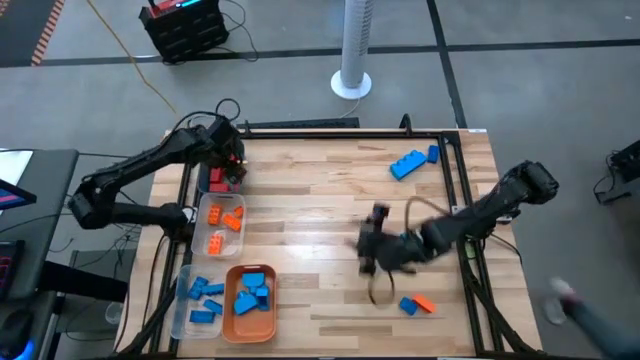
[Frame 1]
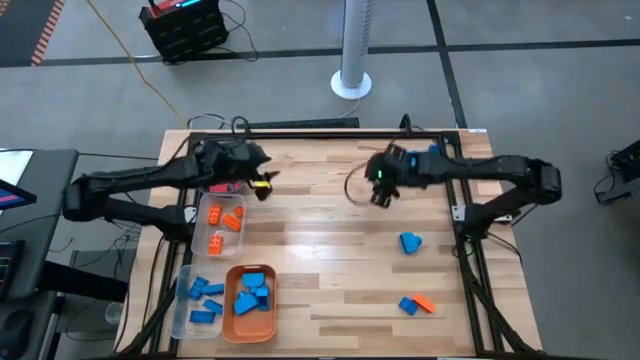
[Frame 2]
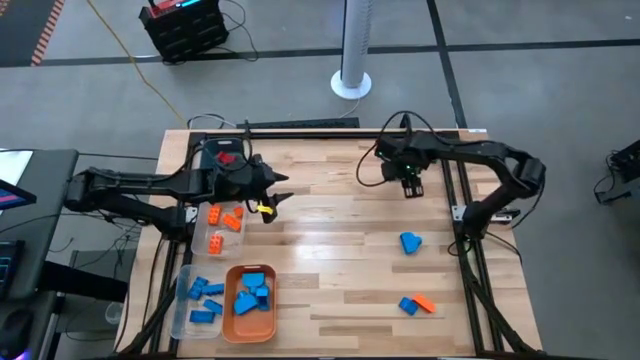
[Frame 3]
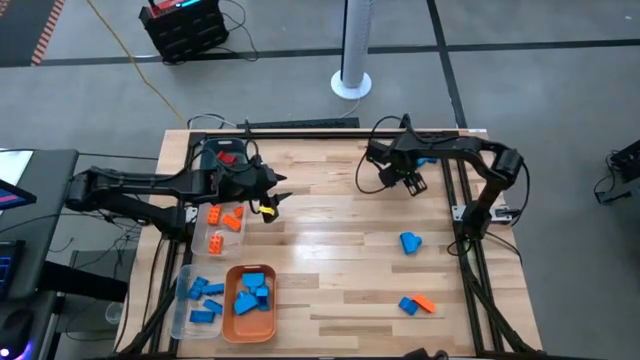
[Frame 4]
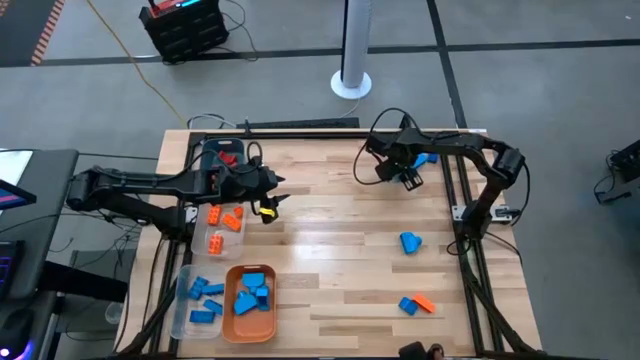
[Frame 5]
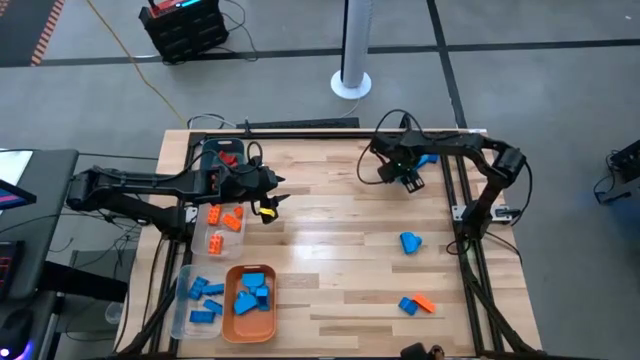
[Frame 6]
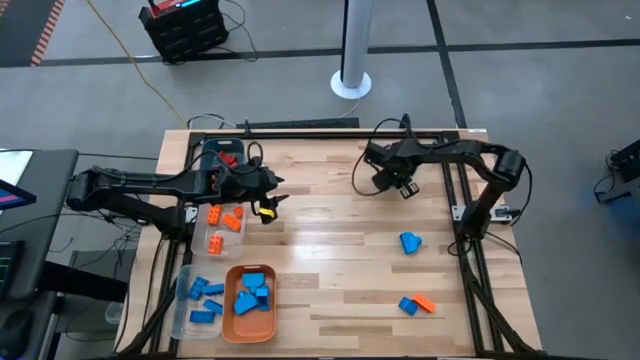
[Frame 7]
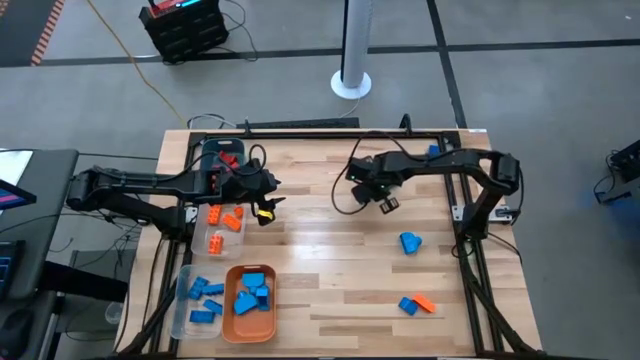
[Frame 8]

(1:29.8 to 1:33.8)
Task: Sort blocks
Put the light blue game piece into the orange bin

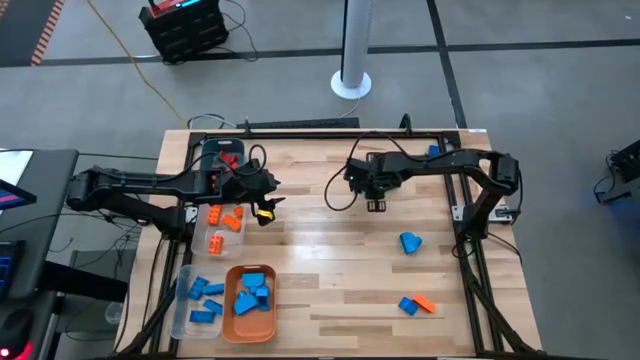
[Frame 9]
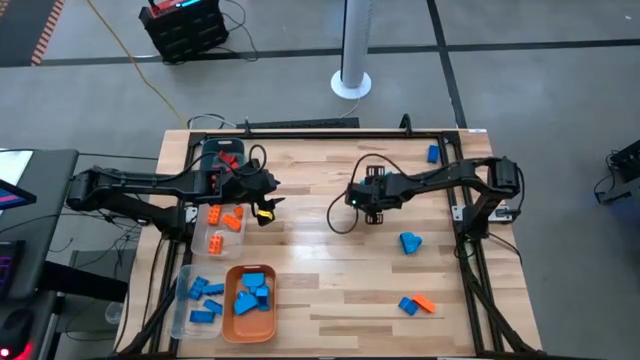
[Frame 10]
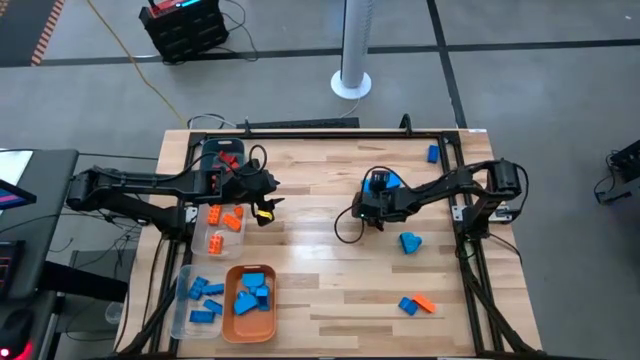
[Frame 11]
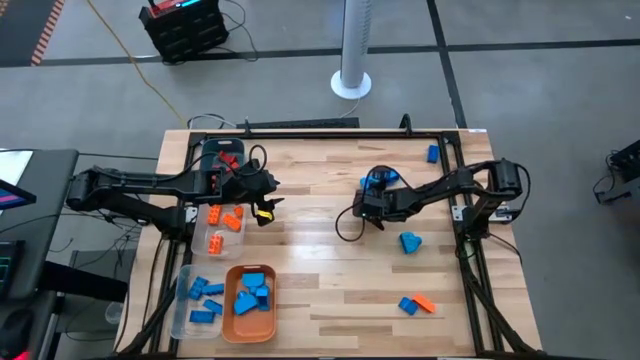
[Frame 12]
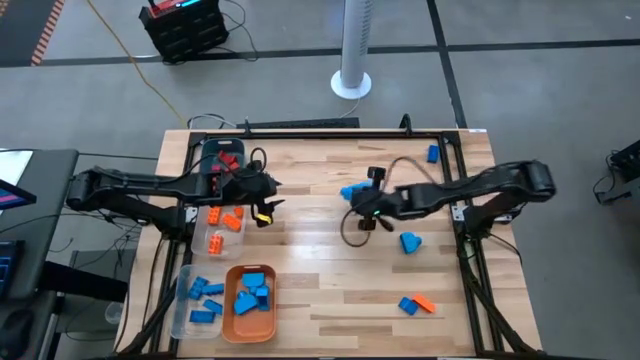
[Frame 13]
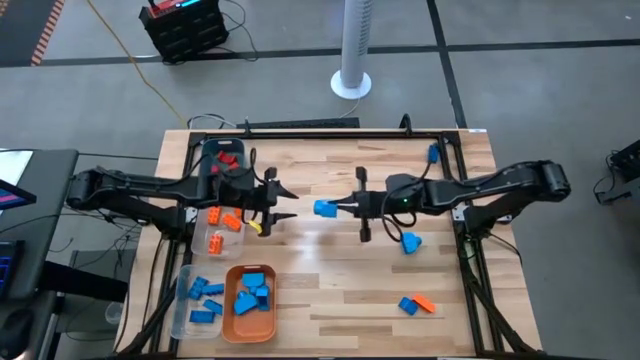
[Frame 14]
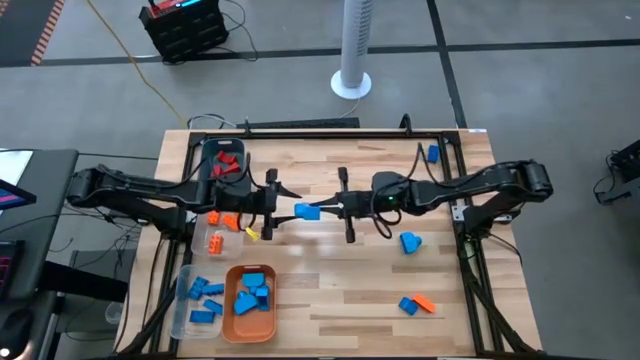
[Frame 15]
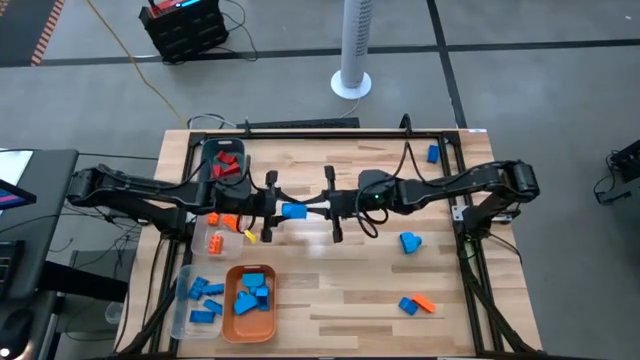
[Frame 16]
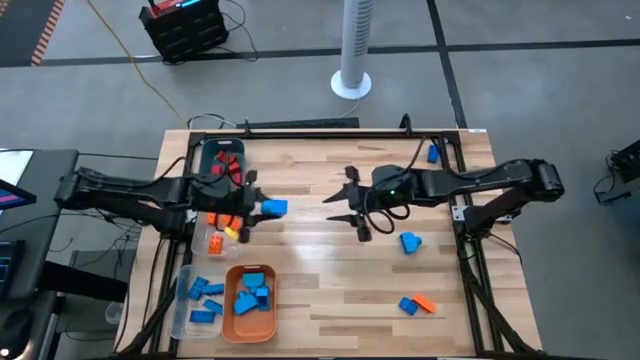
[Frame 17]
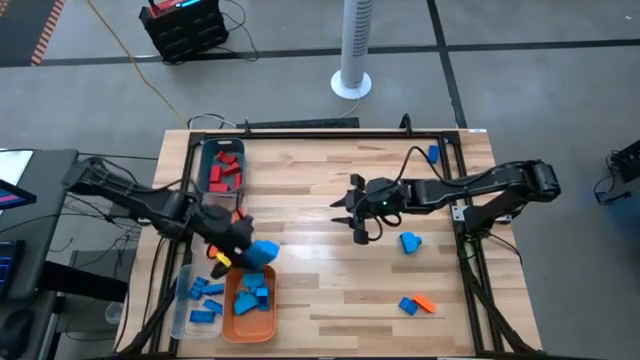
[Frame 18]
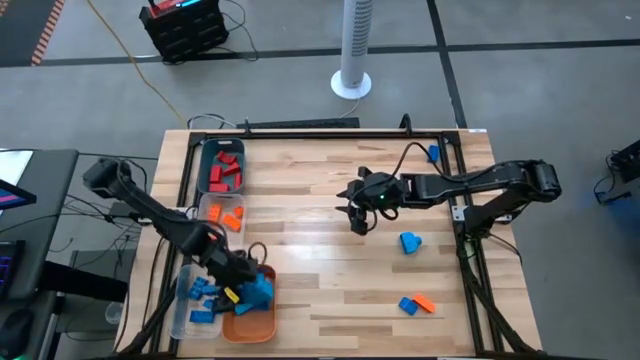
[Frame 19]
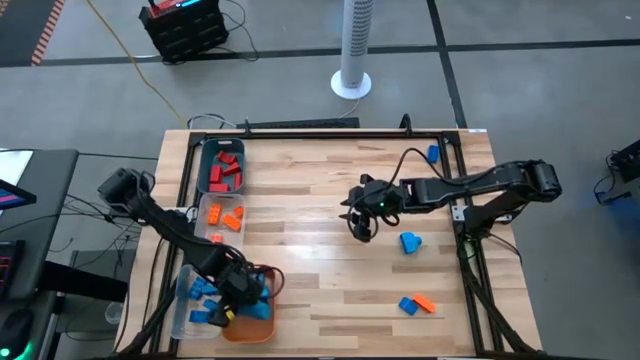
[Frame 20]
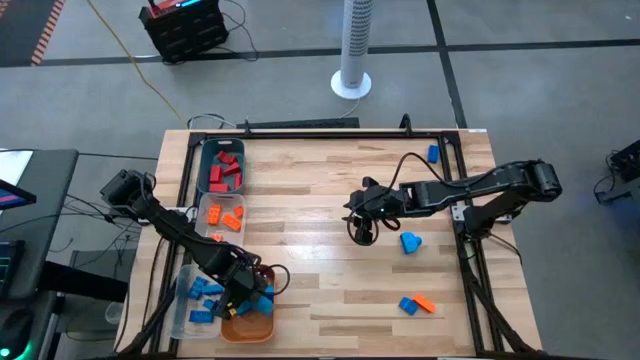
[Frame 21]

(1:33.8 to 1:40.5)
Put the light blue game piece into the orange bin

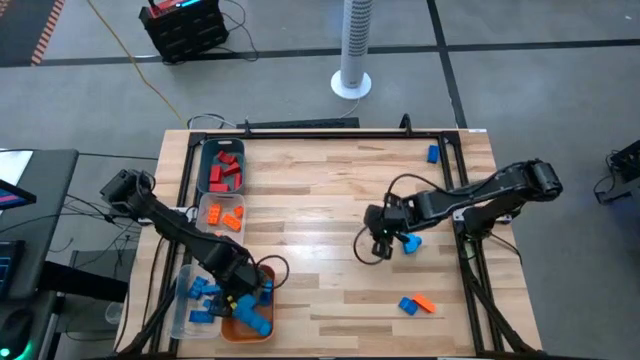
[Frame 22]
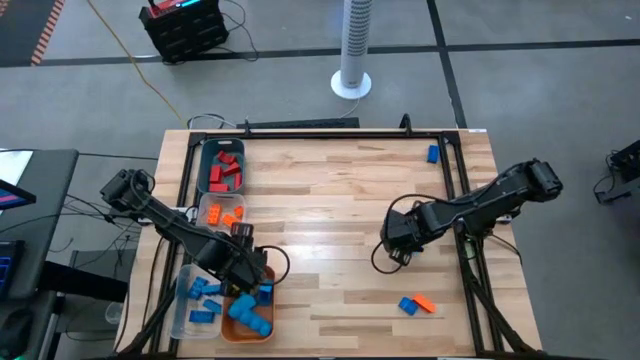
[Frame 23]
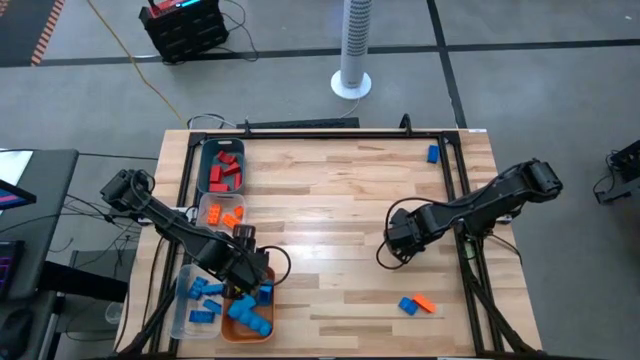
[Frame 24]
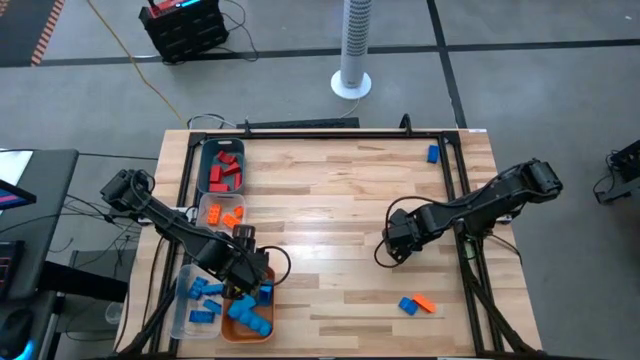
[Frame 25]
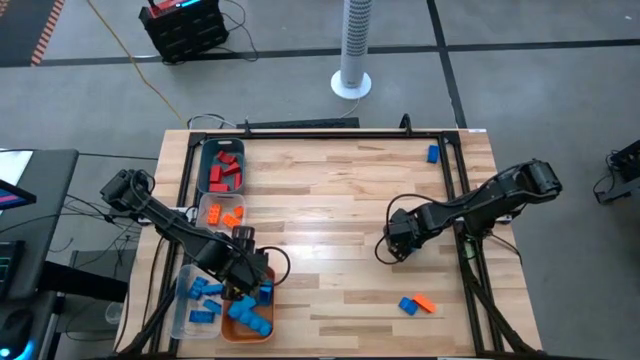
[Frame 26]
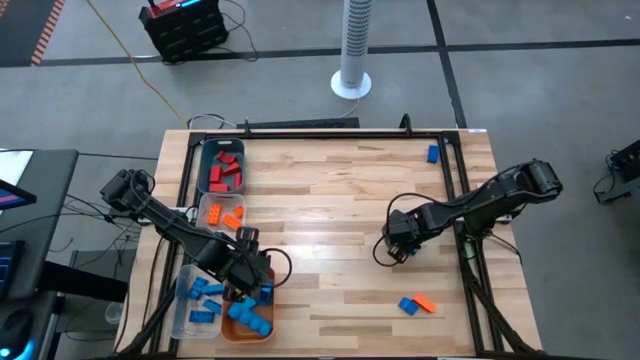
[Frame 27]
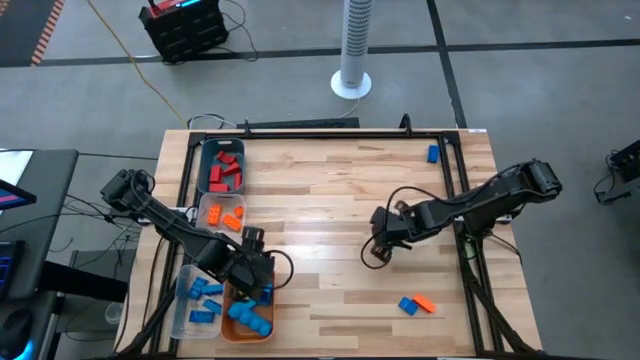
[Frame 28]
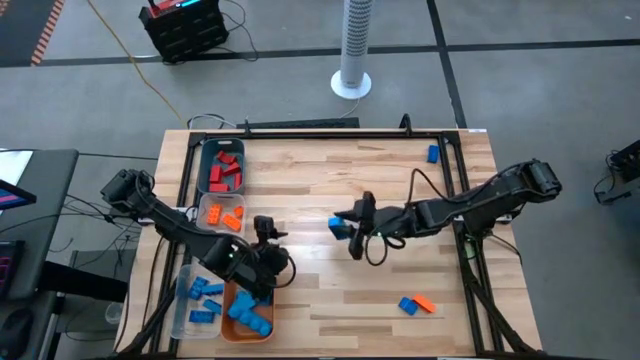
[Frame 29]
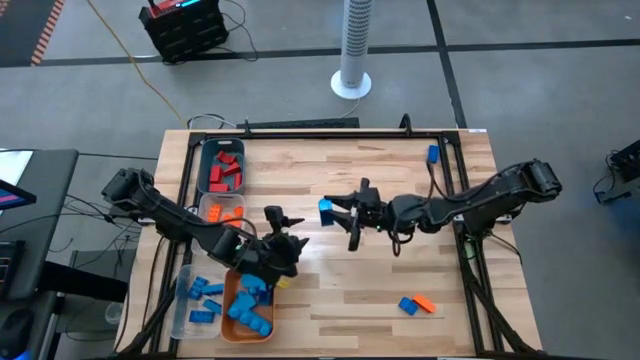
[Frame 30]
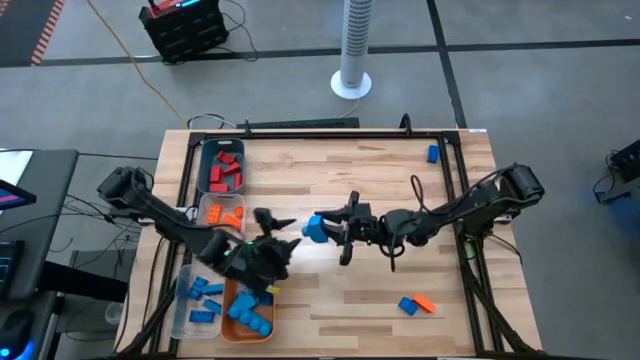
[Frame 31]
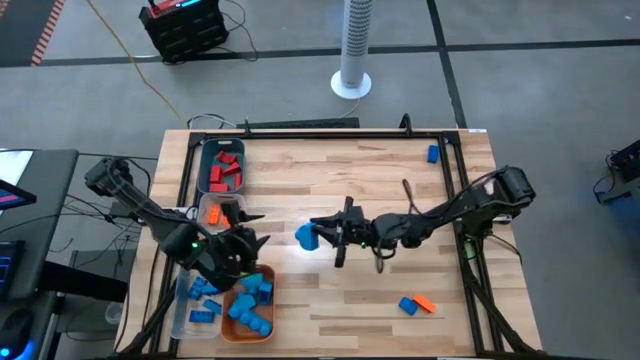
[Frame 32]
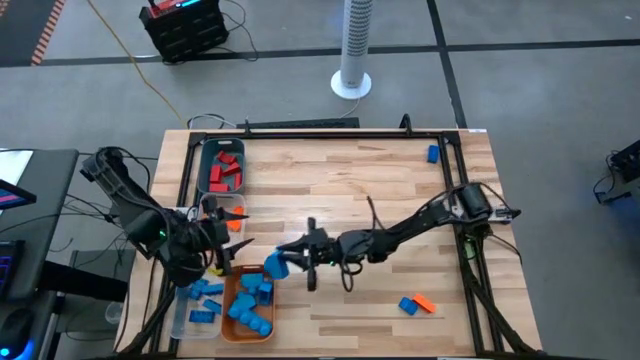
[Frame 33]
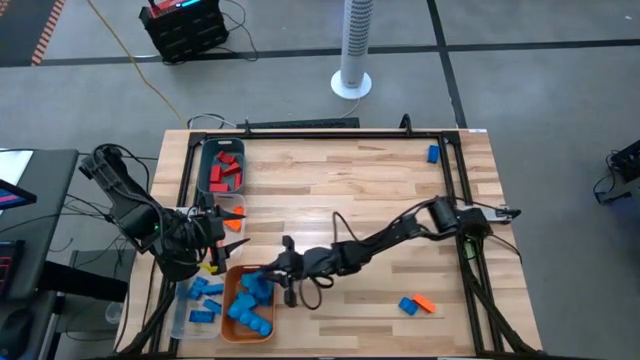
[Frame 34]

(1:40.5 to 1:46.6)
Put the light blue game piece into the orange bin

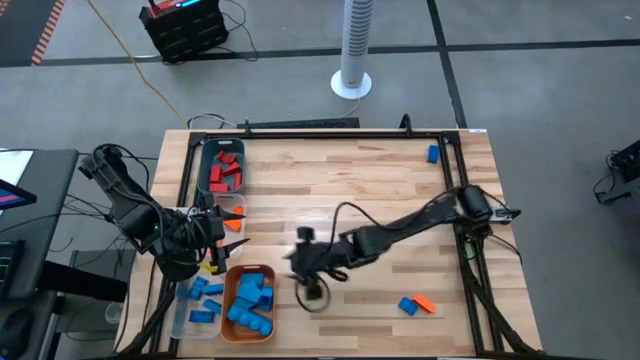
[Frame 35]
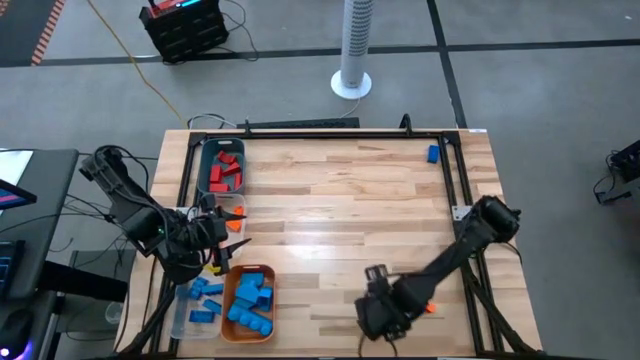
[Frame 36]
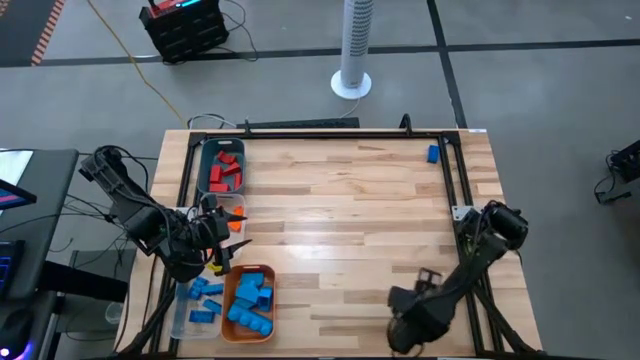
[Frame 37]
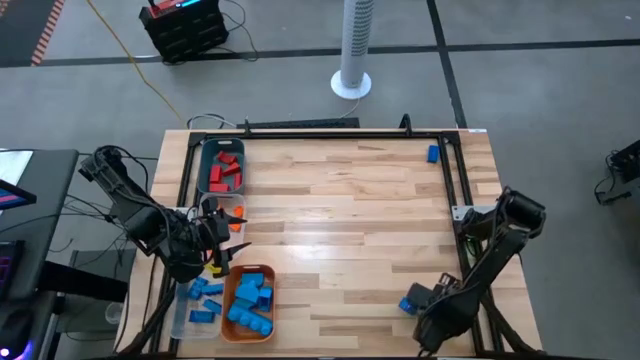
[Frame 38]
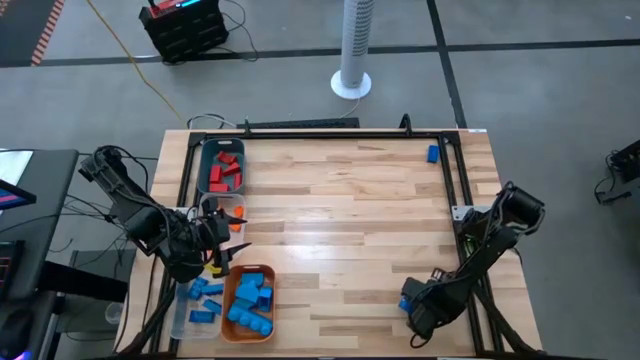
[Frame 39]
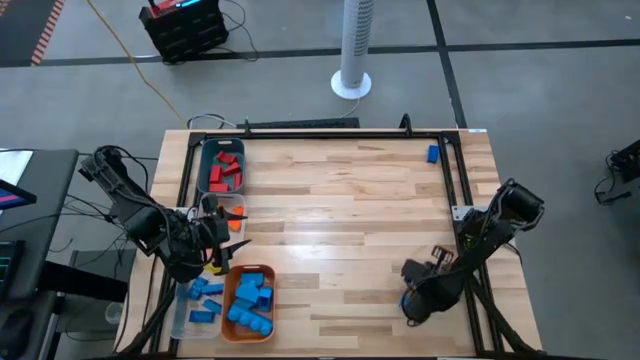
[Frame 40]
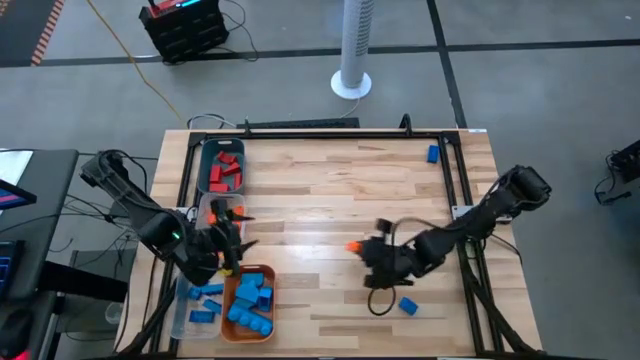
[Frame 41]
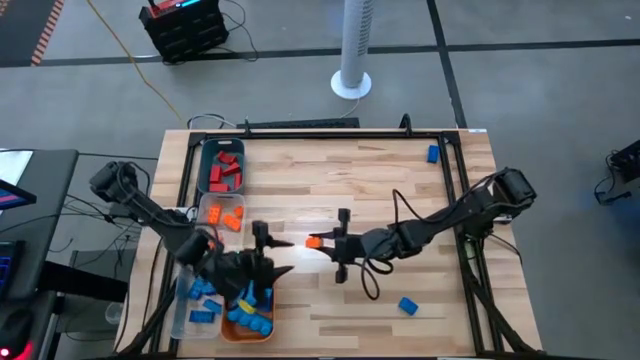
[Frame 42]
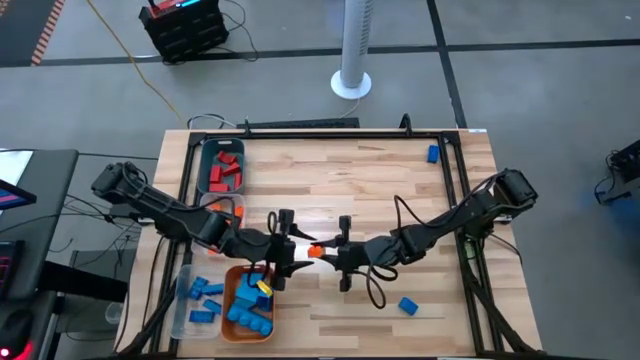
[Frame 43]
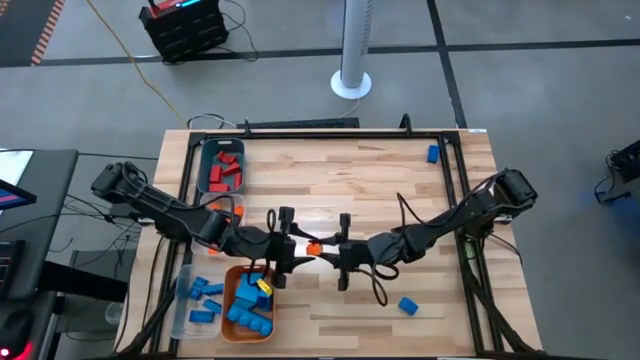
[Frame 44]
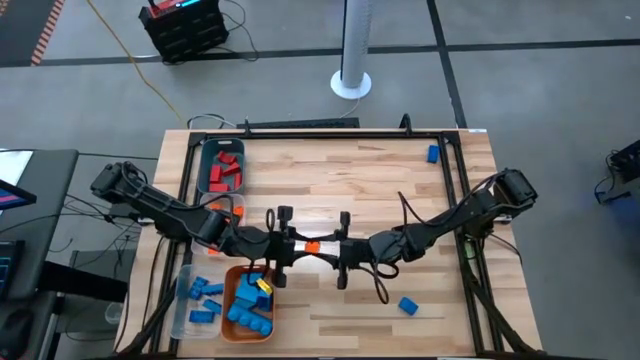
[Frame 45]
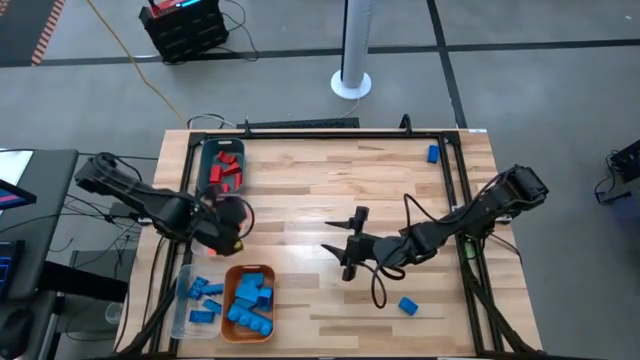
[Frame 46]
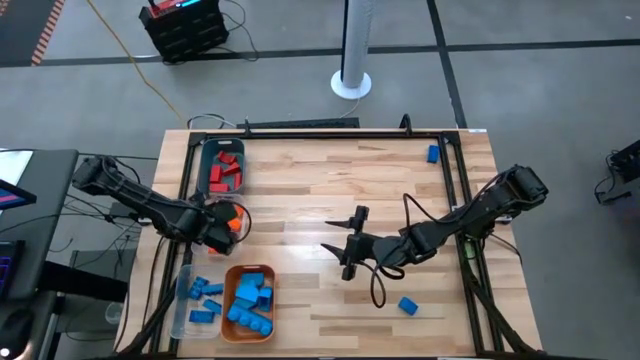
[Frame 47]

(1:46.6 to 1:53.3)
Put the orange game piece into the top transparent bin
